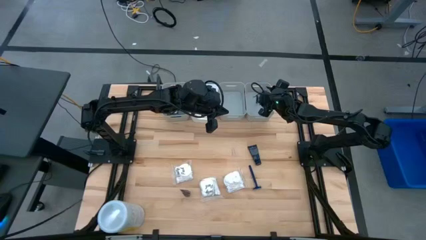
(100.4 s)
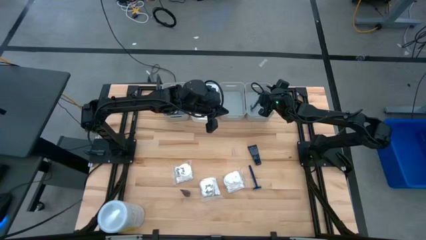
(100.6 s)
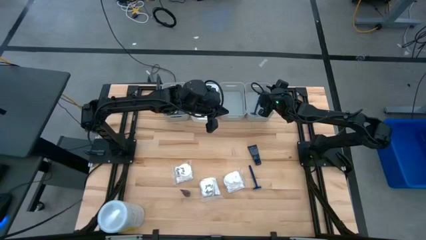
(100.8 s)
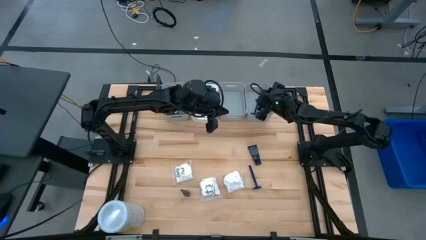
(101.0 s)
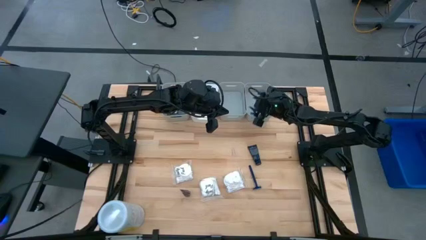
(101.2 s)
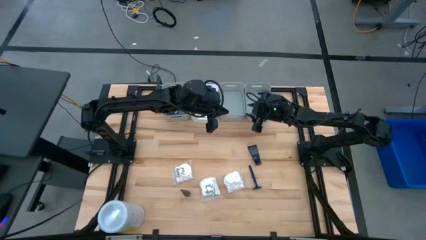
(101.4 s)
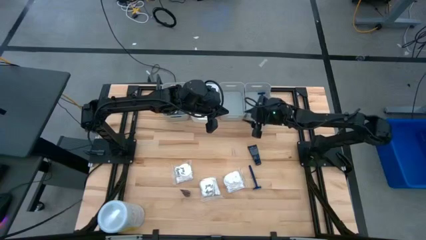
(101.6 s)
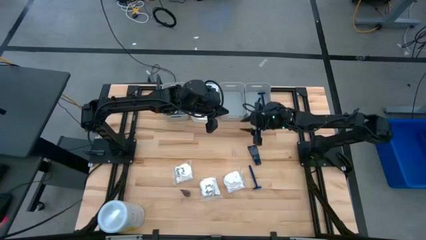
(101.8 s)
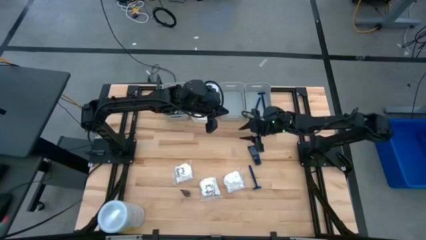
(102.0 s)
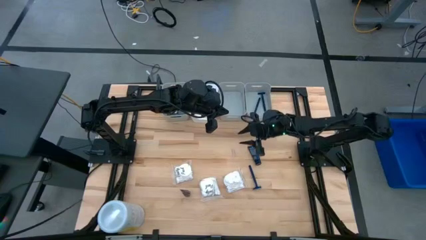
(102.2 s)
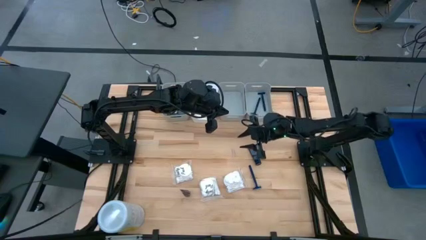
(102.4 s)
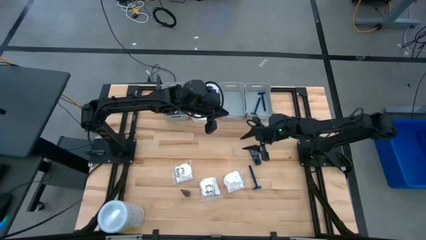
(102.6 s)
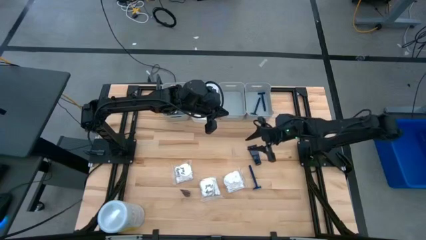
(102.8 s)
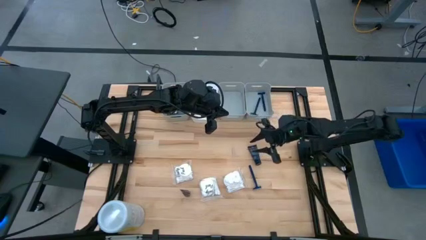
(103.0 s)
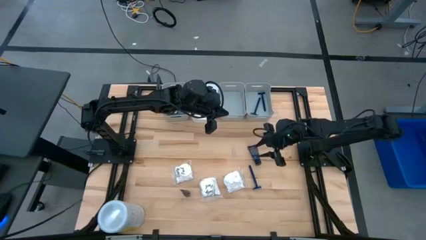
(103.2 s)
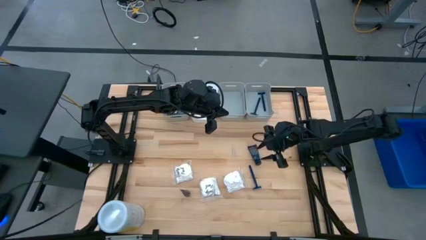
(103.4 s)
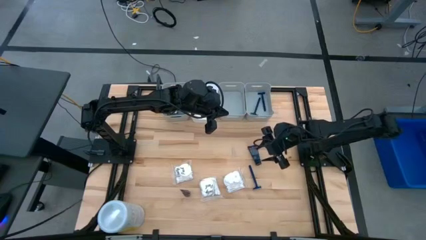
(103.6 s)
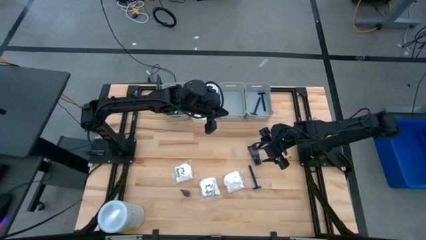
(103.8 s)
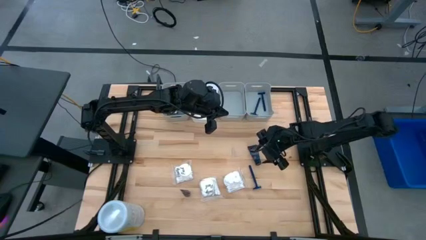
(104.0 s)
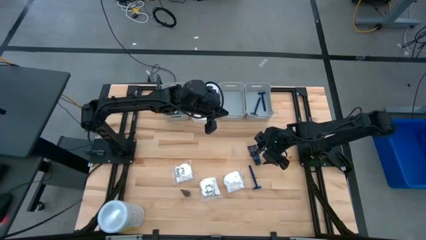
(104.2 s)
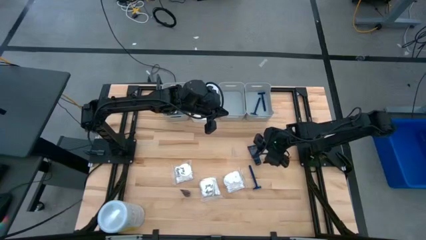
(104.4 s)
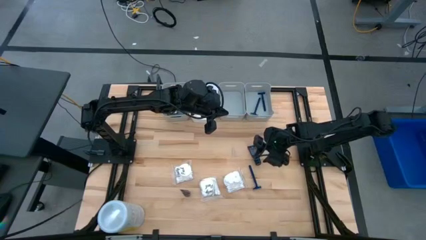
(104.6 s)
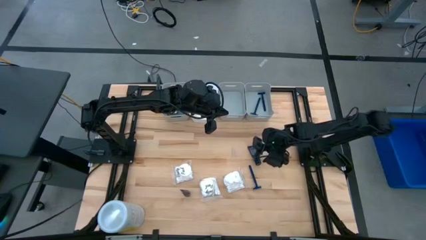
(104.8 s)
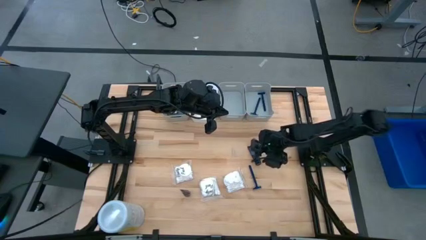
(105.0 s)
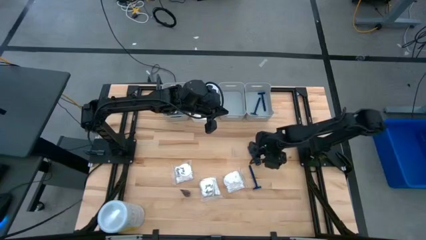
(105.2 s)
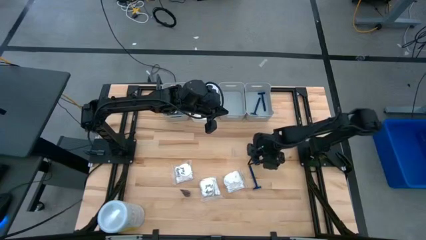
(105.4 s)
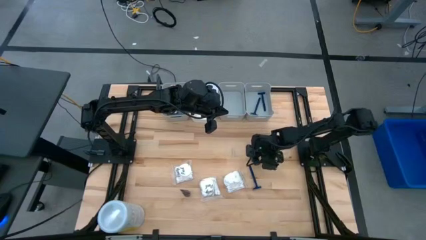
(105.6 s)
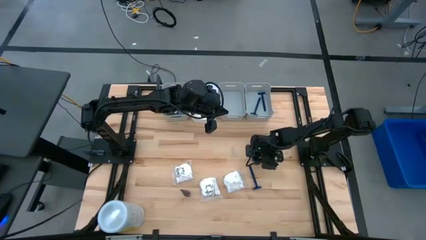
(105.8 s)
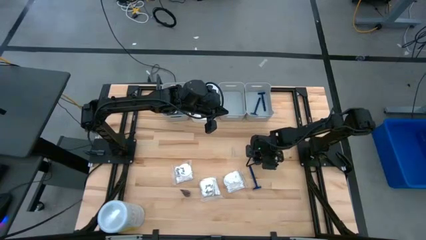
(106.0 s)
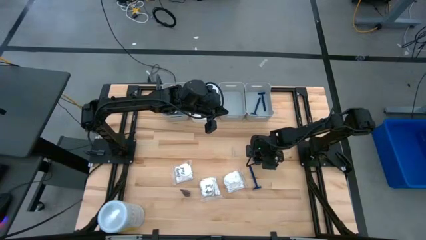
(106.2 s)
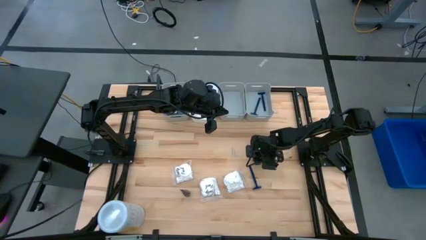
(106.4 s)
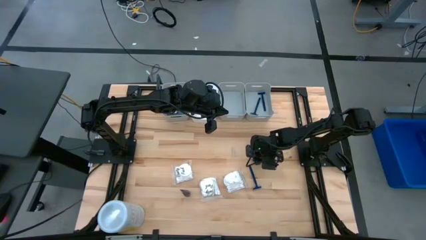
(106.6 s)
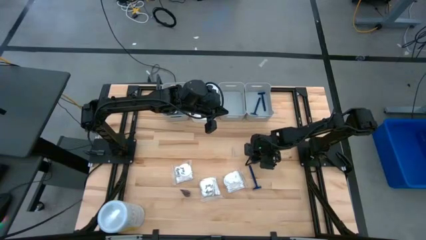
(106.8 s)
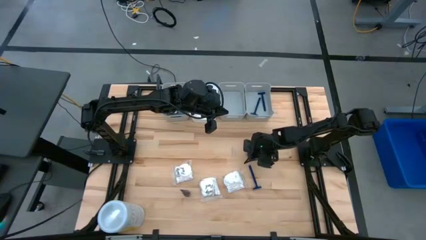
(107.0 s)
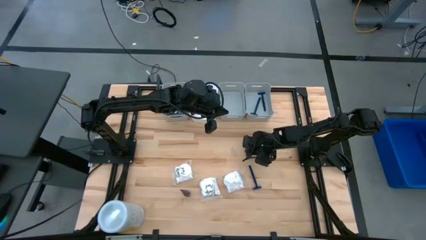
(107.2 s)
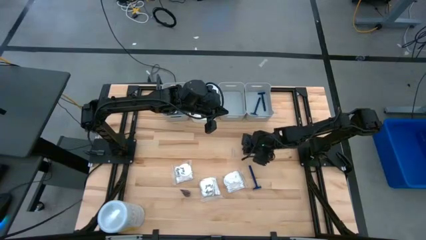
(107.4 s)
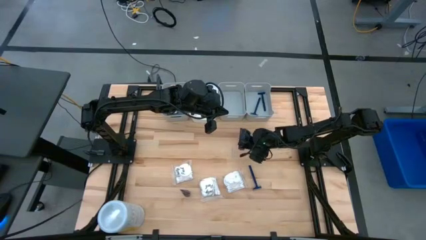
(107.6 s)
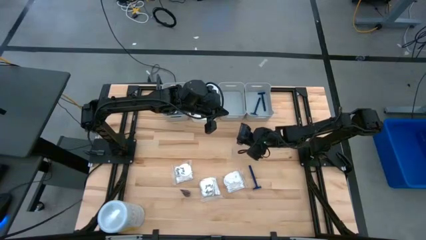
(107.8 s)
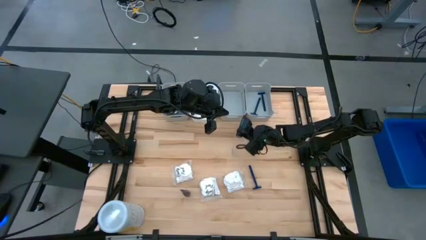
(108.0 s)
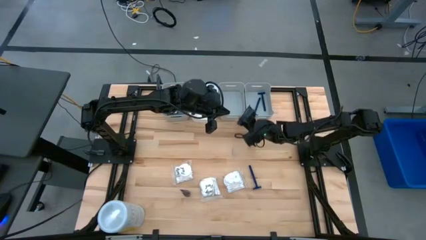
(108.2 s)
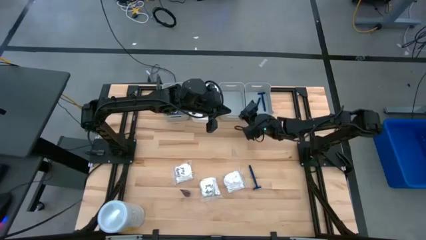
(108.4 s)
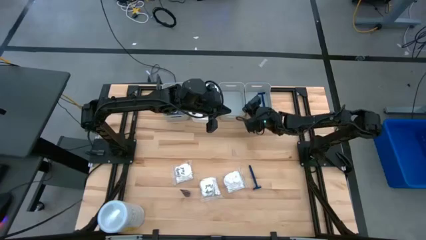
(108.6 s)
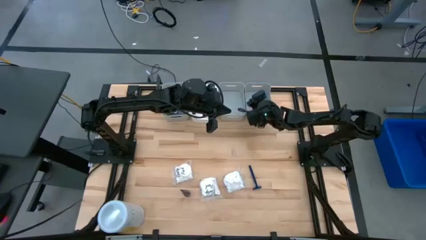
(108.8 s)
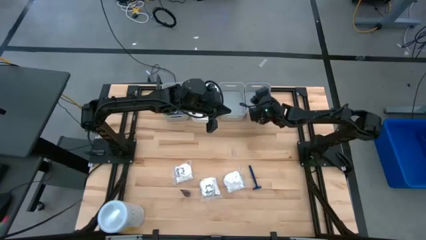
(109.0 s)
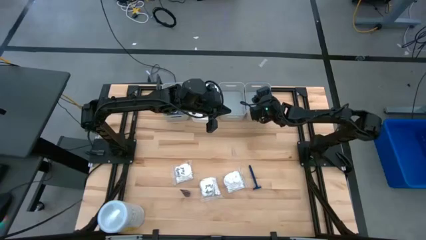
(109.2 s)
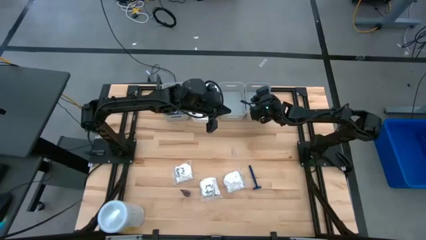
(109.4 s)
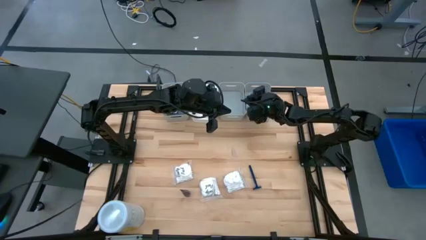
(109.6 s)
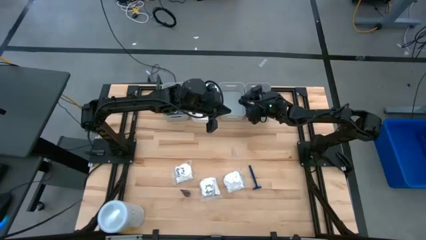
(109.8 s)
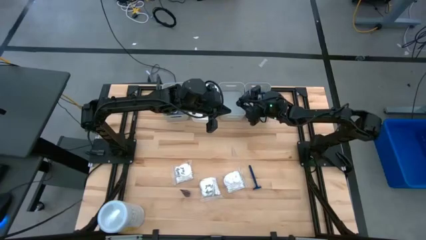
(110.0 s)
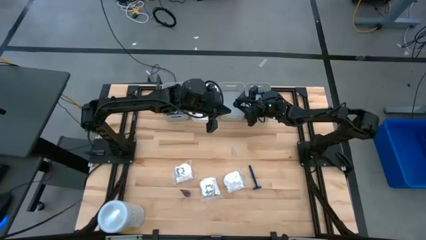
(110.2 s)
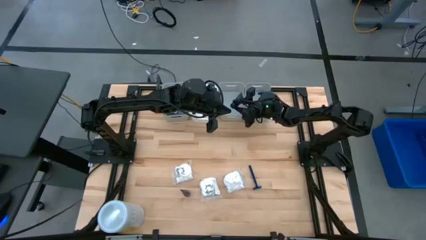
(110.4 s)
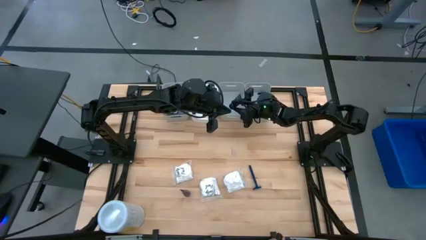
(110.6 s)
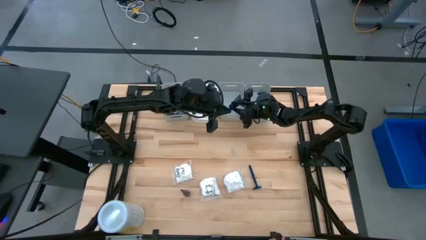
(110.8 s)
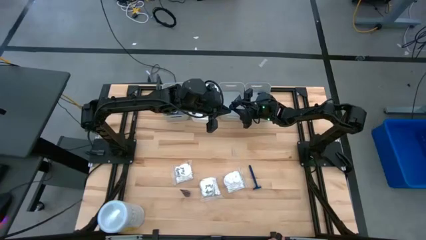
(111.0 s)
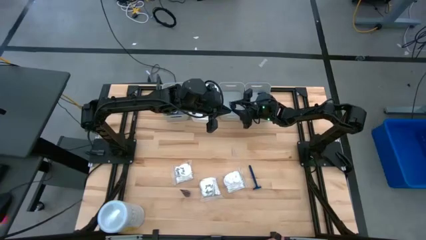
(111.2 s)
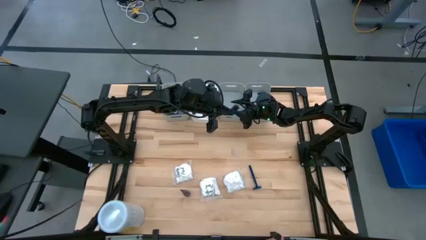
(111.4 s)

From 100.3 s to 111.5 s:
Task: Pick & Place Travel size toiletries
Put the blue shave cream into the middle gray bin
